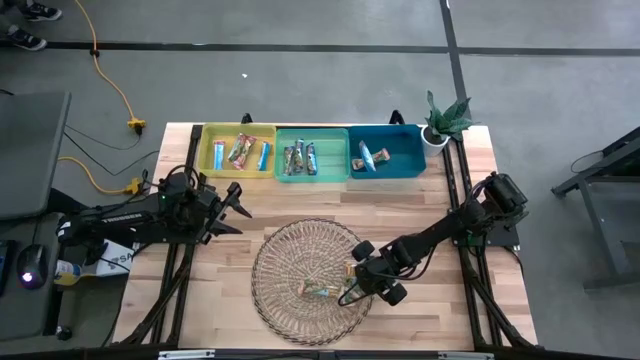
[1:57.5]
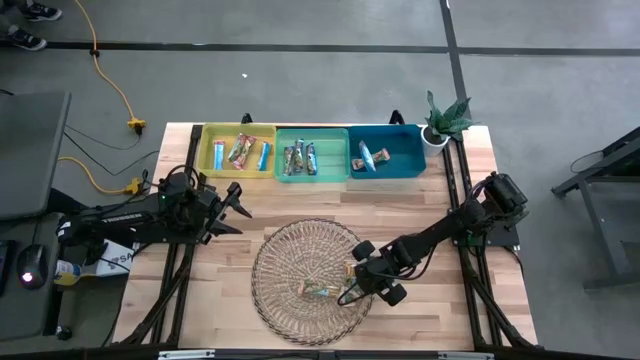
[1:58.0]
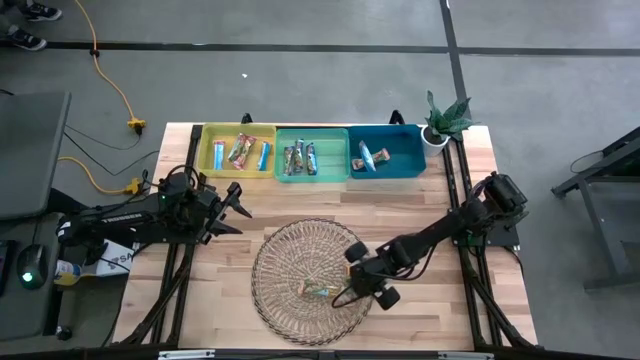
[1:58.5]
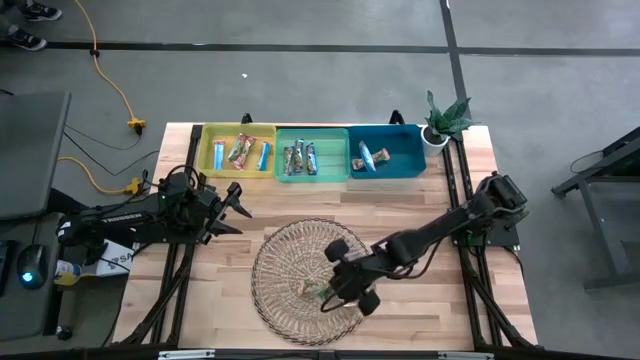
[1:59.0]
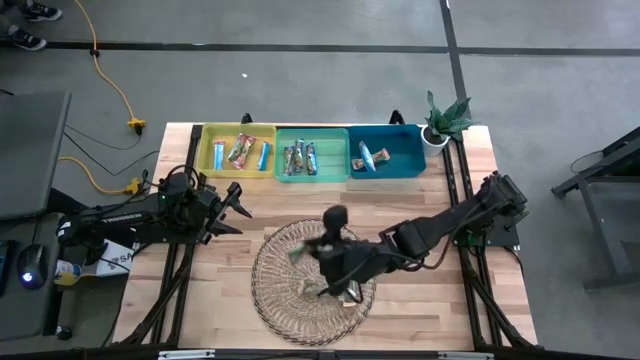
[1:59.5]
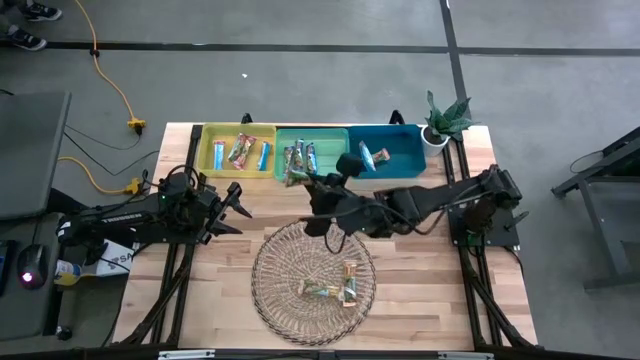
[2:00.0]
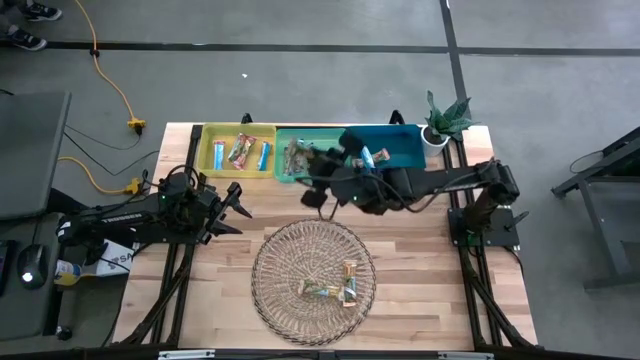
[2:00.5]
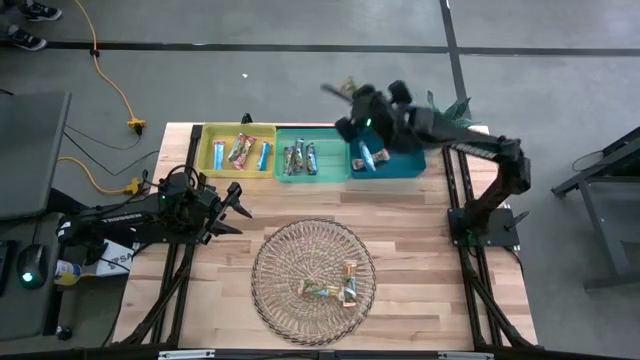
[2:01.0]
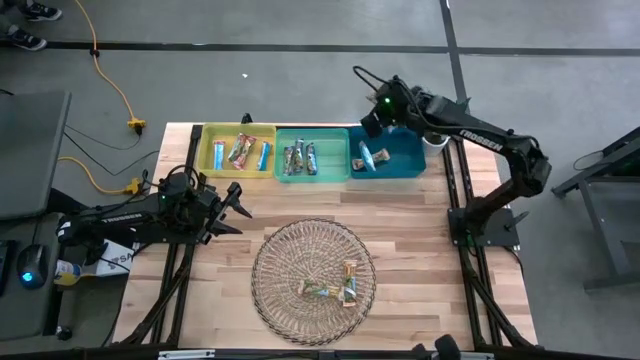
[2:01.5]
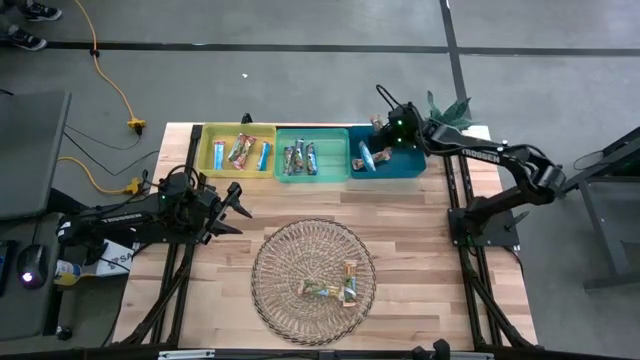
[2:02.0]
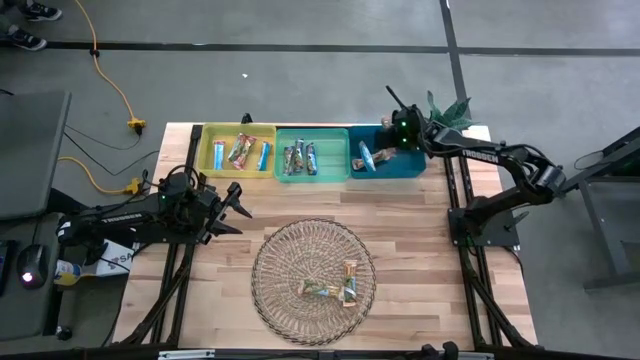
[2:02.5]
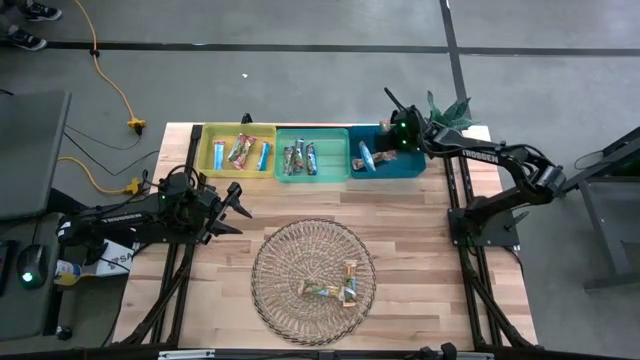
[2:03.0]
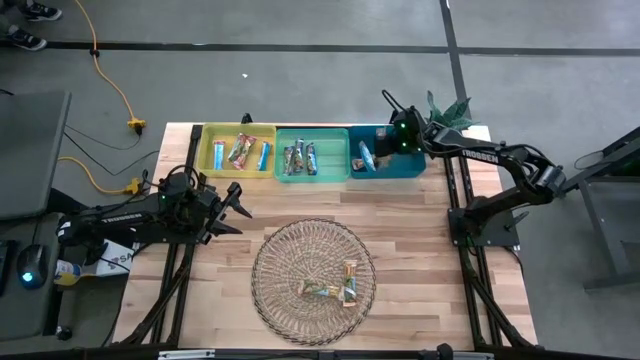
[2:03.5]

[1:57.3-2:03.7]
Task: Pick and place Granola Bars by type
Put the yellow granola bar into the blue bin

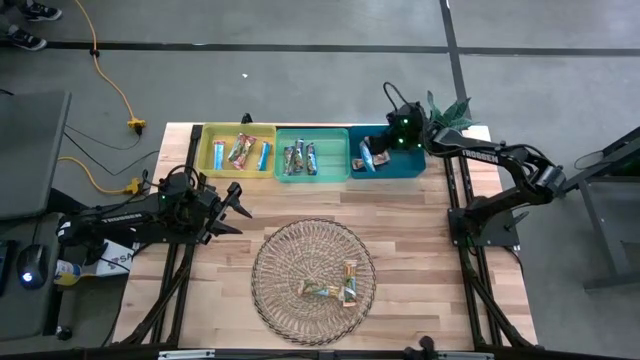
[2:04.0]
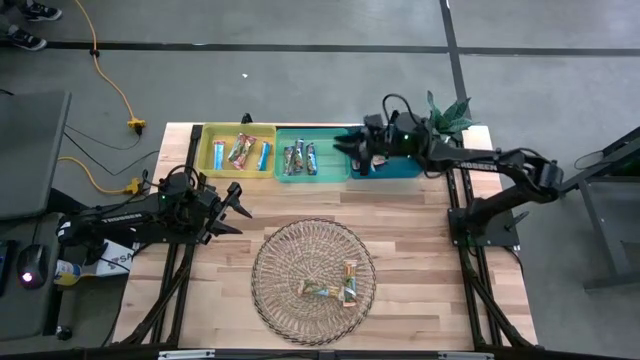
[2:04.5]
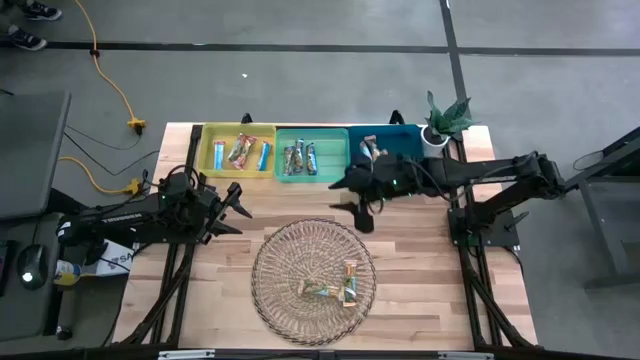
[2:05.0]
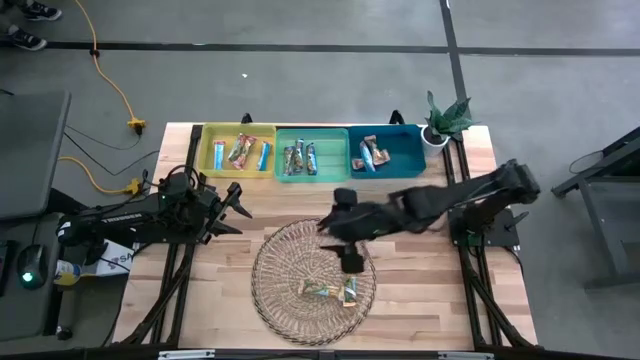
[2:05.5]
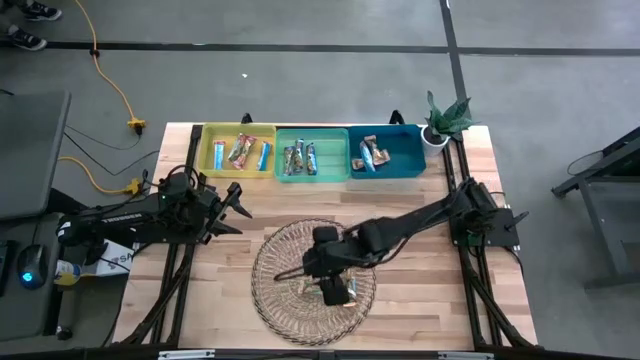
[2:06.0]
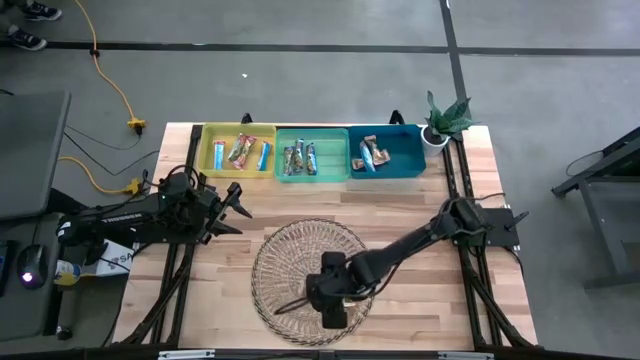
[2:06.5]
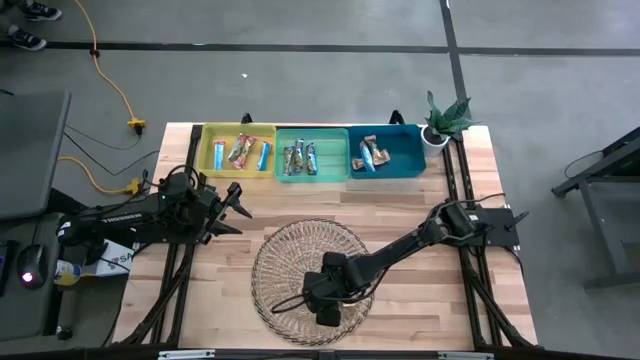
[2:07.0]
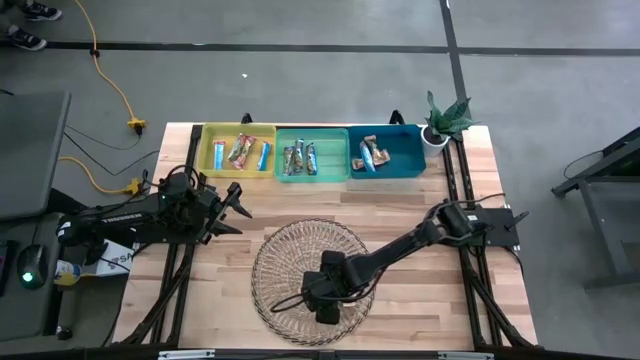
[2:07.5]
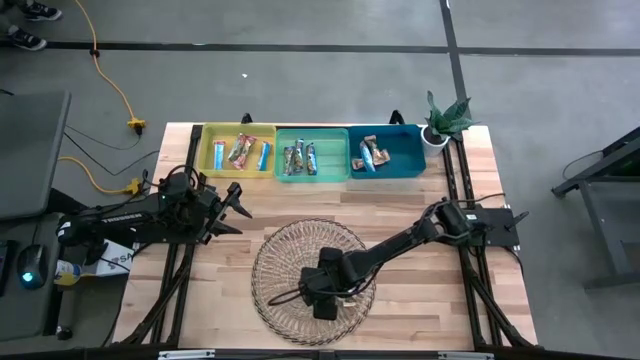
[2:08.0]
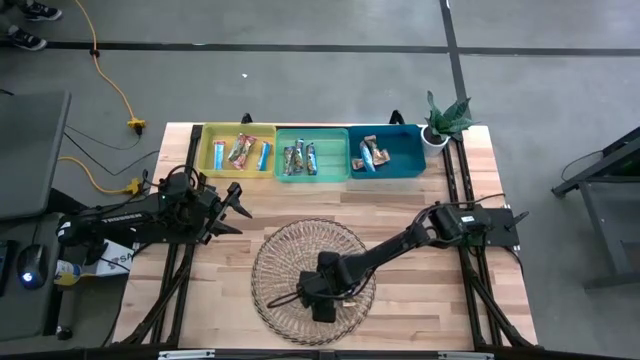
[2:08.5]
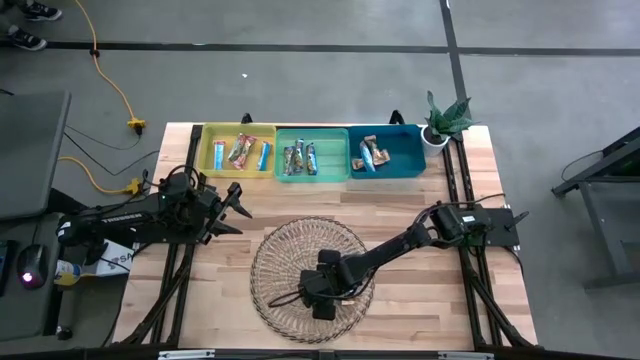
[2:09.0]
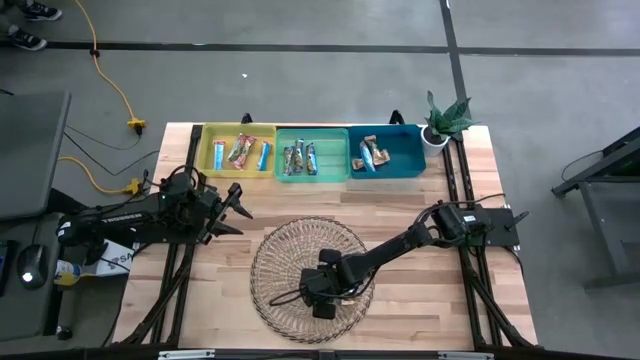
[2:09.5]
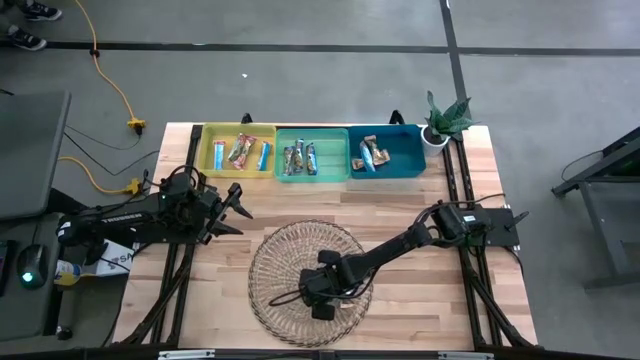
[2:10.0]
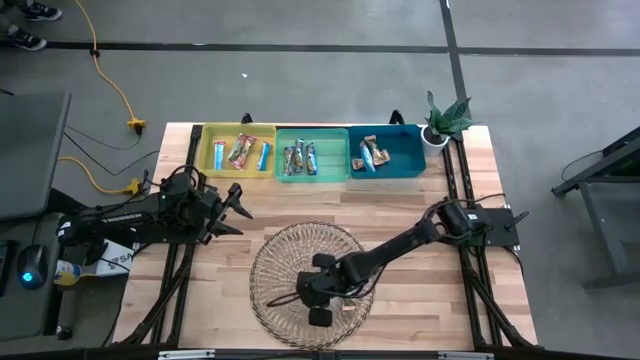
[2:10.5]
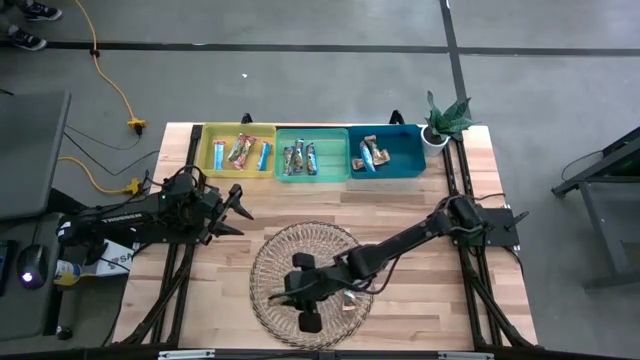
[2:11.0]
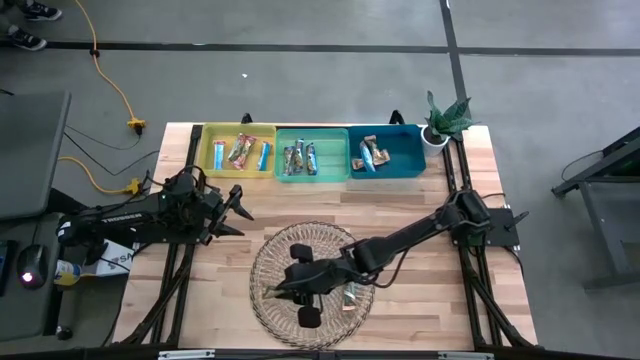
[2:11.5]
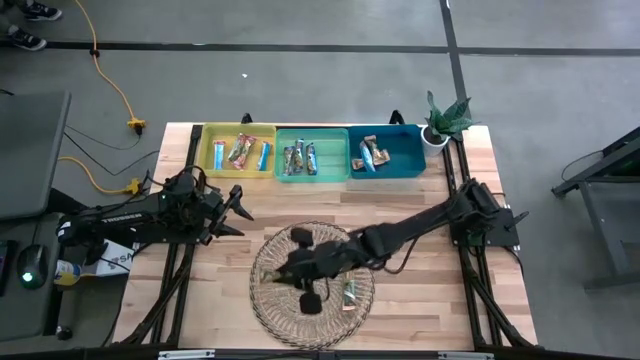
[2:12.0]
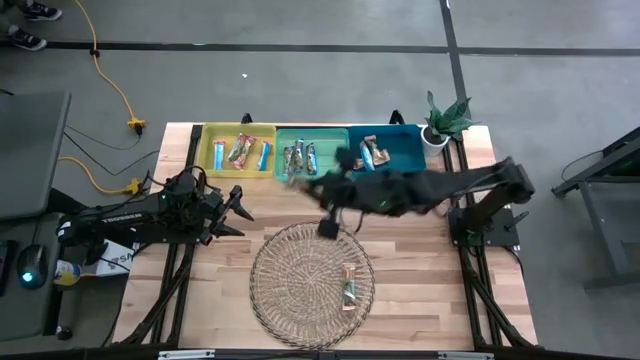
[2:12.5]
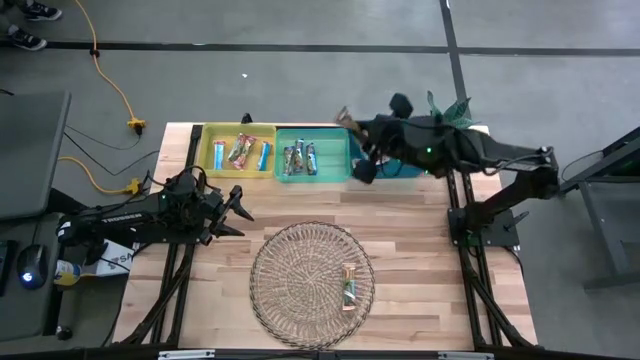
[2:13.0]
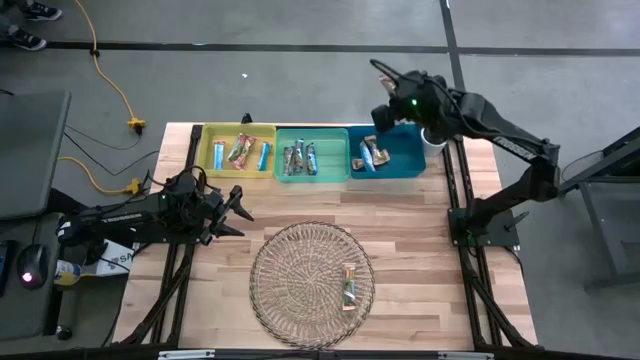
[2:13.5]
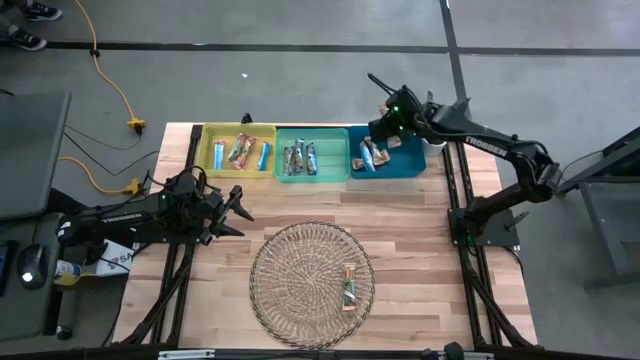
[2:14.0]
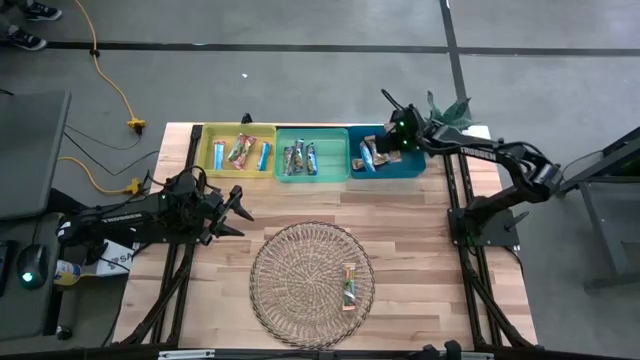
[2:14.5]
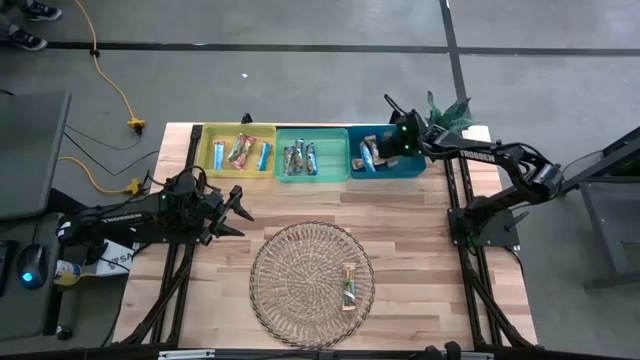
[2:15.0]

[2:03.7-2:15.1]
Put the yellow granola bar into the blue bin

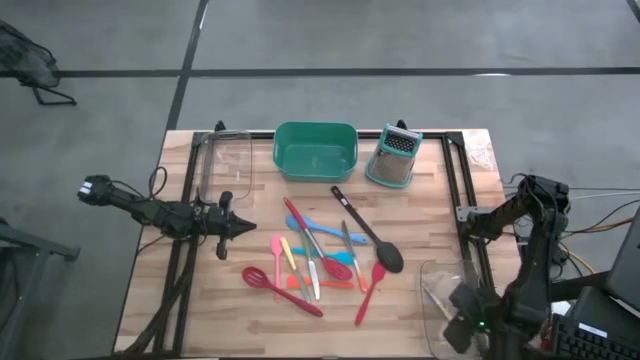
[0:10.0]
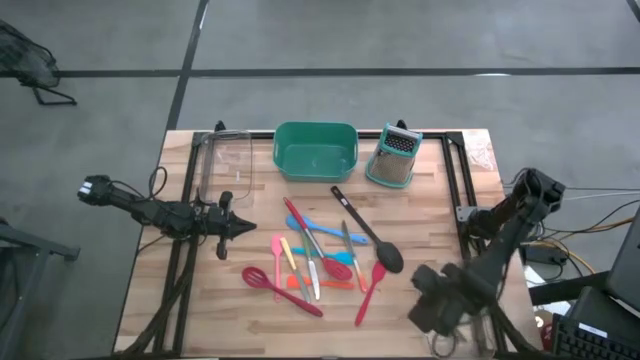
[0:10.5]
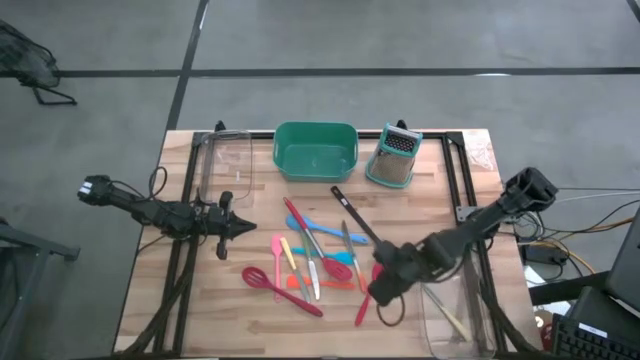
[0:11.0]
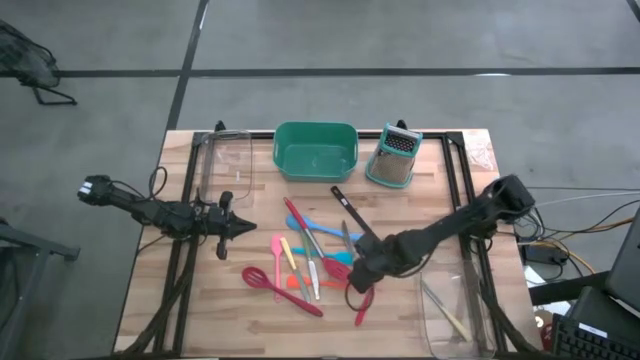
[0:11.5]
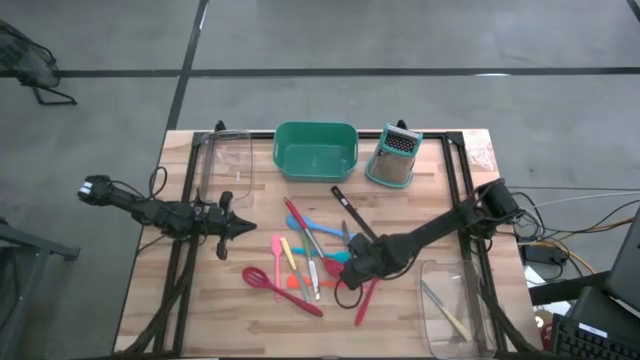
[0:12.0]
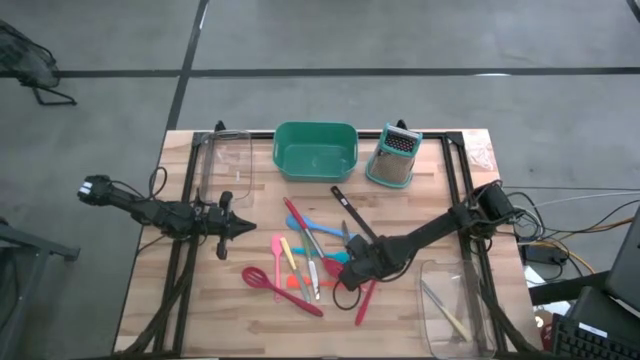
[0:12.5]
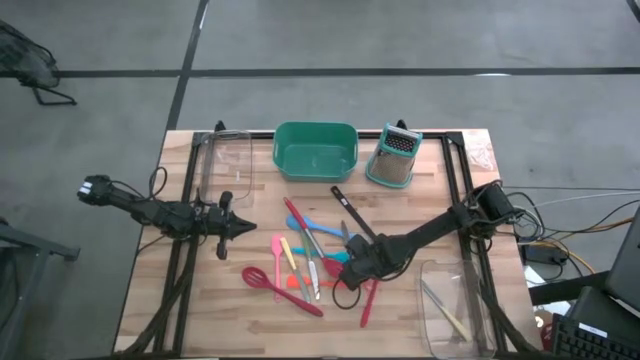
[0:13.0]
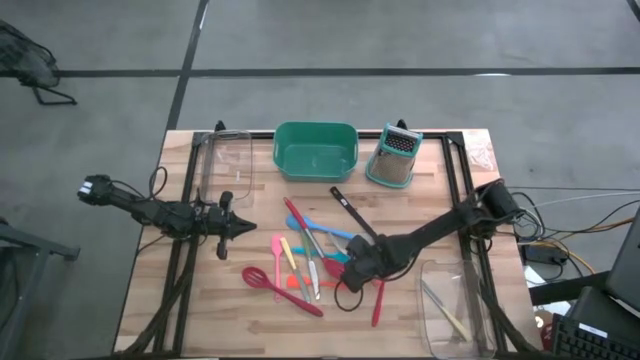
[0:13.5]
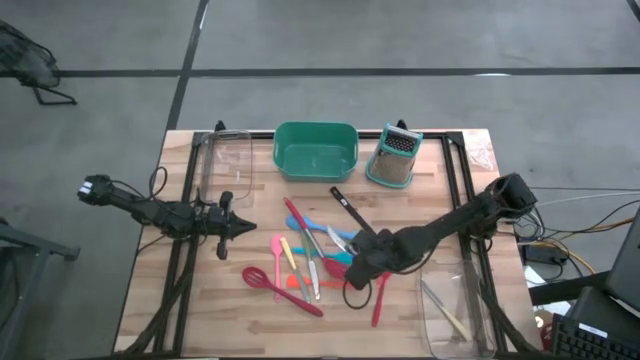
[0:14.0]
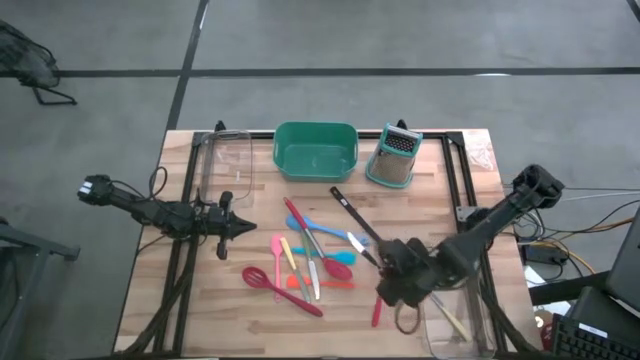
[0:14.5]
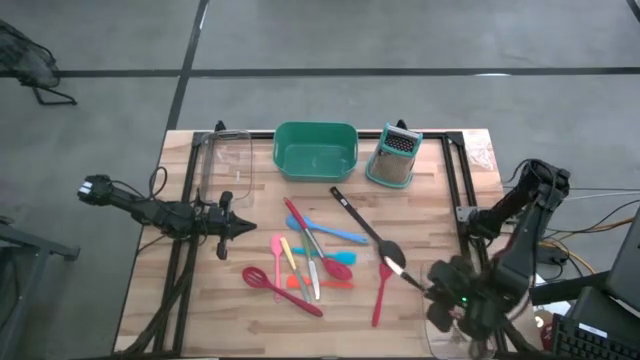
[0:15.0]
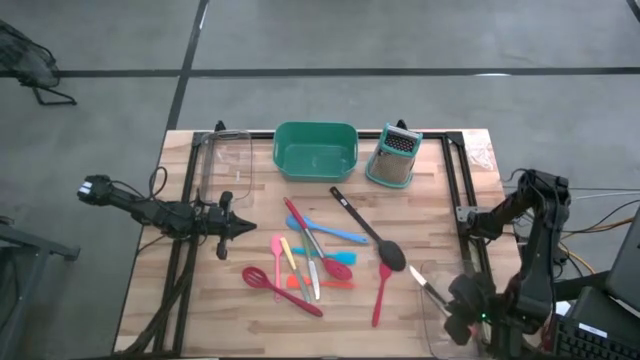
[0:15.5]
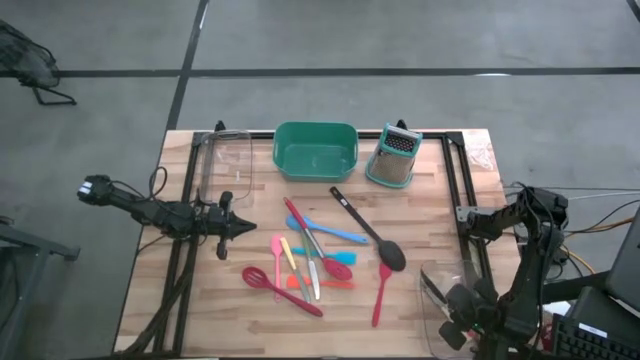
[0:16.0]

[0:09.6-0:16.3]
Task: Pick & Place Kitchen Items
Put the orange knife into the bottom right transparent bin
